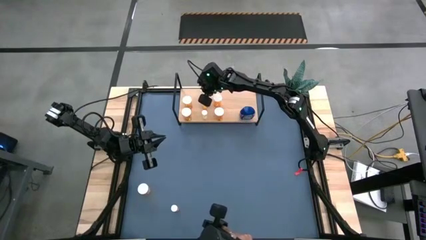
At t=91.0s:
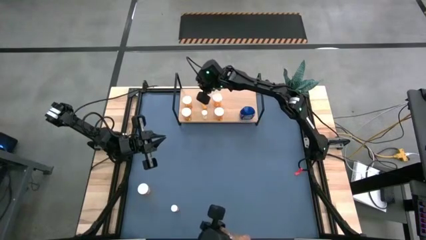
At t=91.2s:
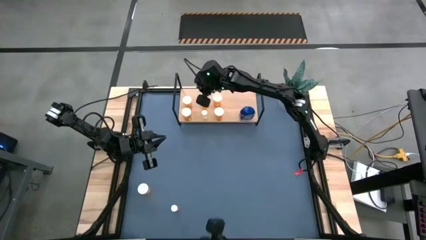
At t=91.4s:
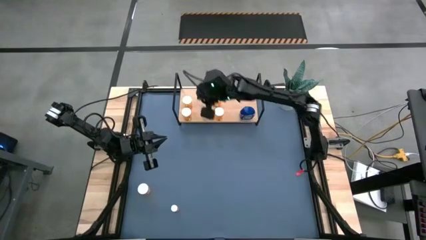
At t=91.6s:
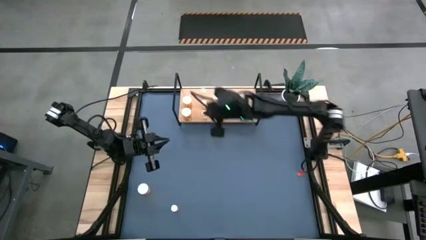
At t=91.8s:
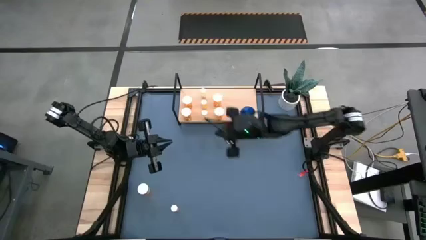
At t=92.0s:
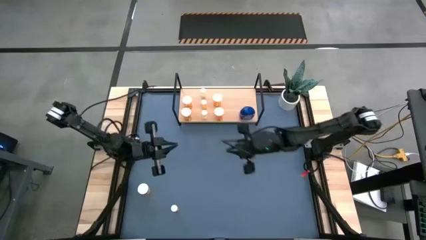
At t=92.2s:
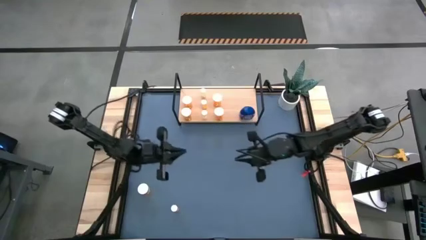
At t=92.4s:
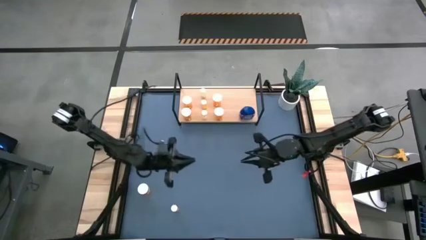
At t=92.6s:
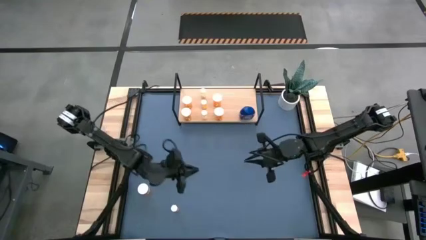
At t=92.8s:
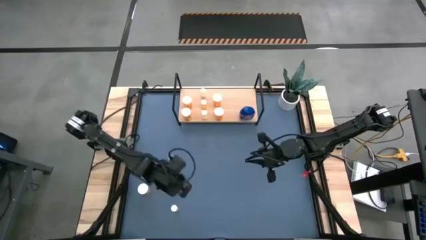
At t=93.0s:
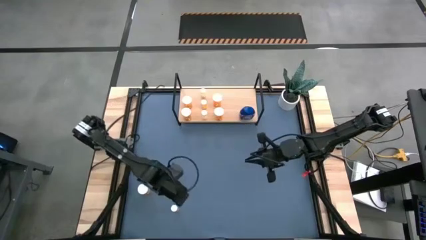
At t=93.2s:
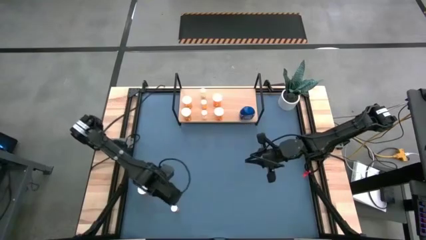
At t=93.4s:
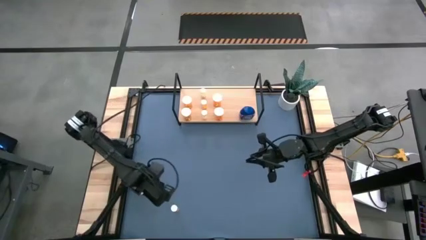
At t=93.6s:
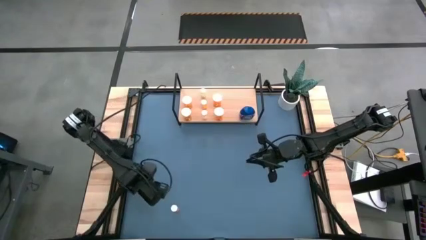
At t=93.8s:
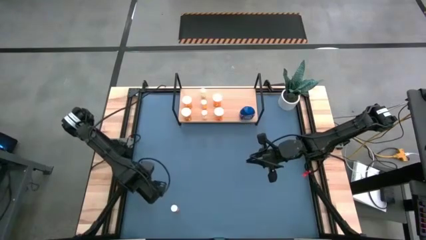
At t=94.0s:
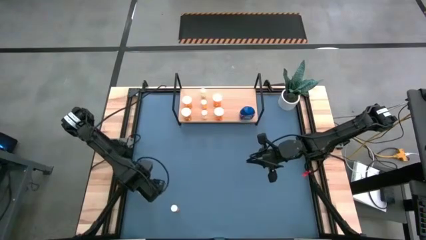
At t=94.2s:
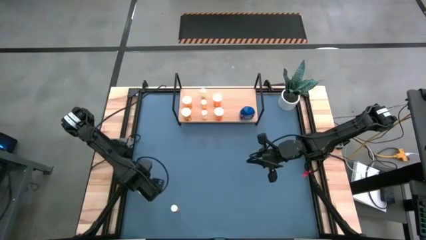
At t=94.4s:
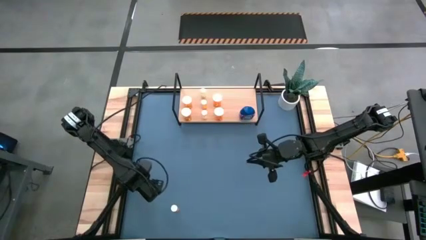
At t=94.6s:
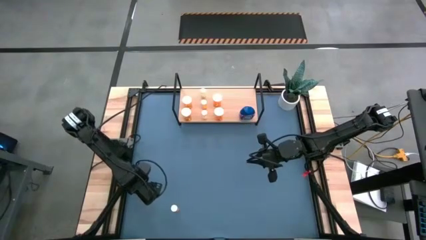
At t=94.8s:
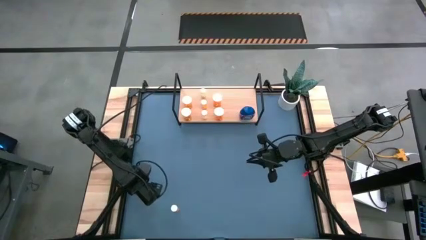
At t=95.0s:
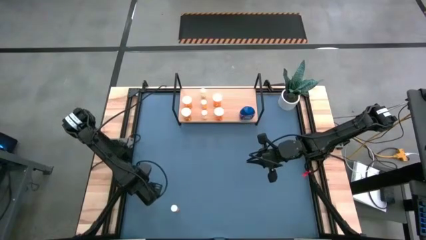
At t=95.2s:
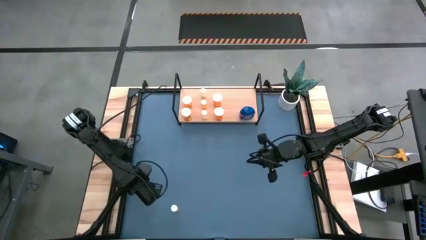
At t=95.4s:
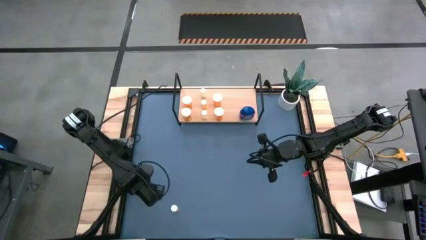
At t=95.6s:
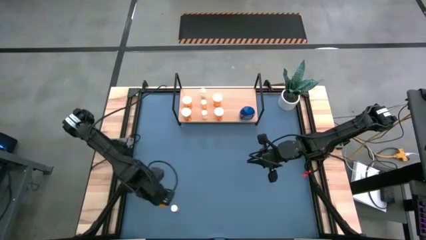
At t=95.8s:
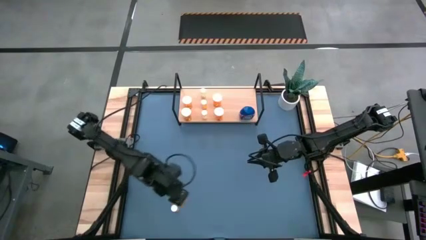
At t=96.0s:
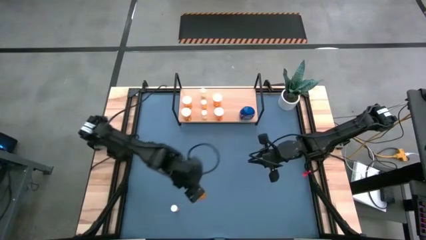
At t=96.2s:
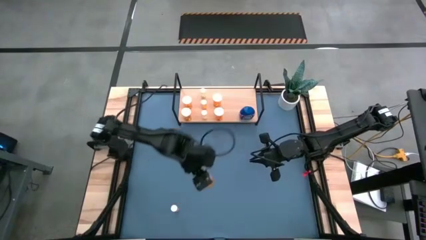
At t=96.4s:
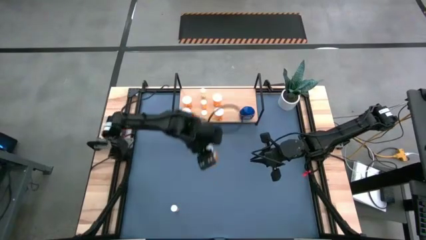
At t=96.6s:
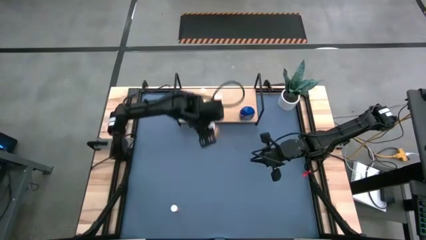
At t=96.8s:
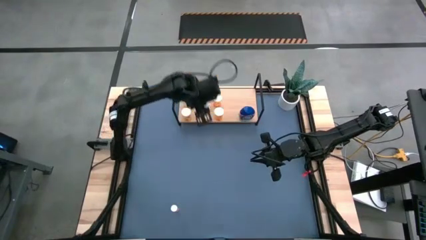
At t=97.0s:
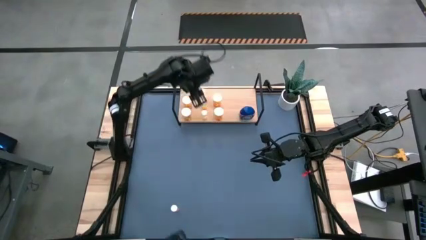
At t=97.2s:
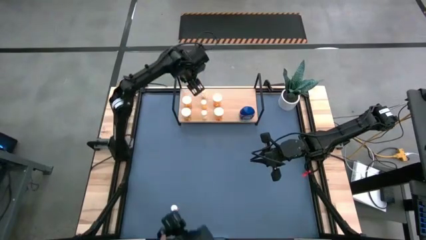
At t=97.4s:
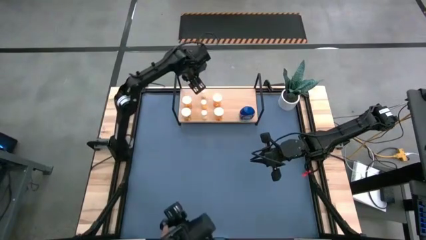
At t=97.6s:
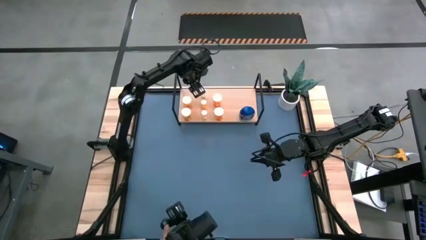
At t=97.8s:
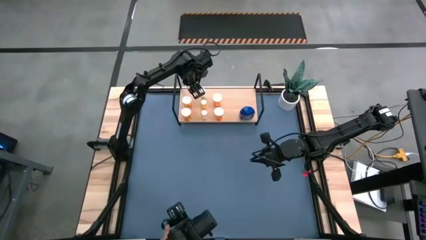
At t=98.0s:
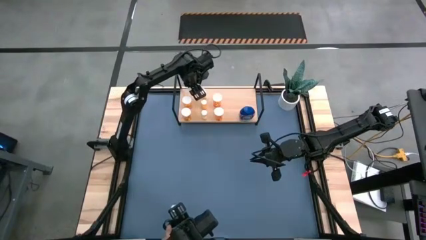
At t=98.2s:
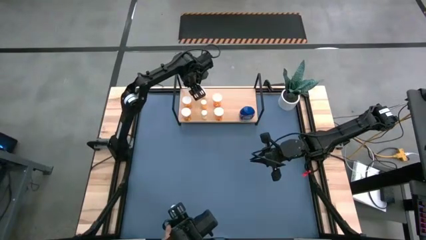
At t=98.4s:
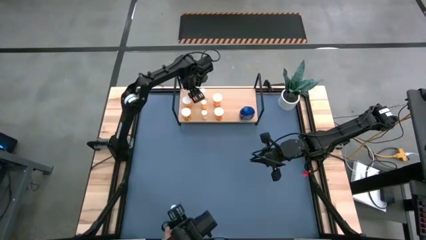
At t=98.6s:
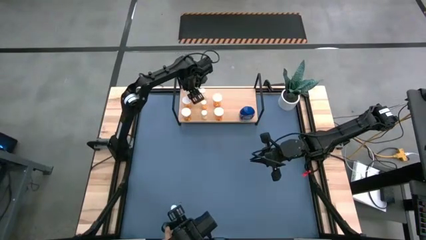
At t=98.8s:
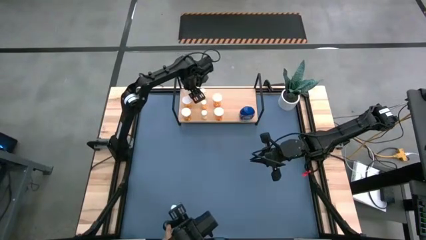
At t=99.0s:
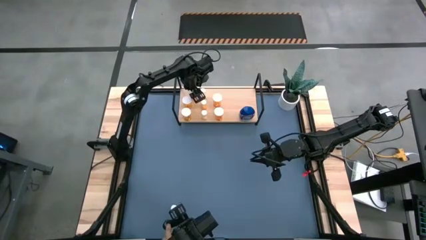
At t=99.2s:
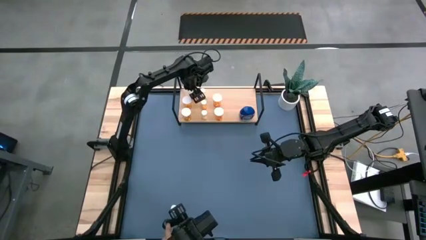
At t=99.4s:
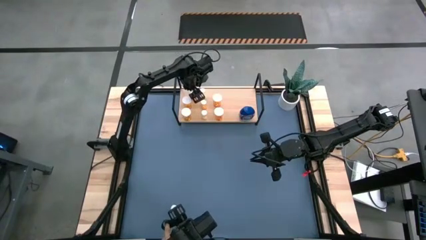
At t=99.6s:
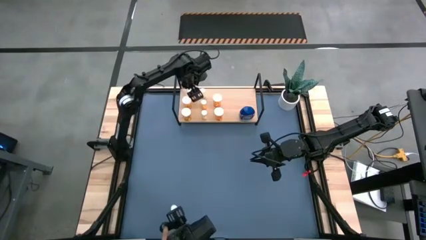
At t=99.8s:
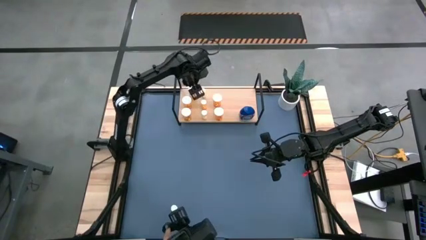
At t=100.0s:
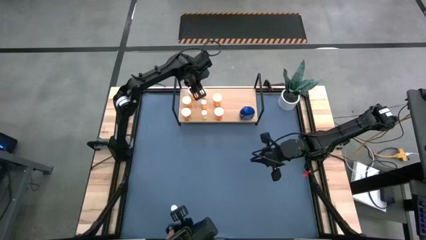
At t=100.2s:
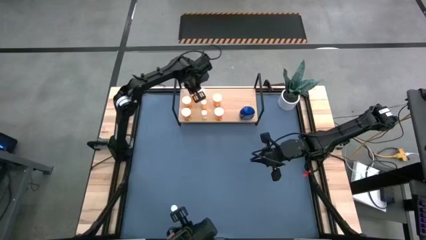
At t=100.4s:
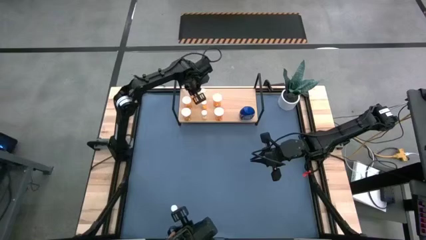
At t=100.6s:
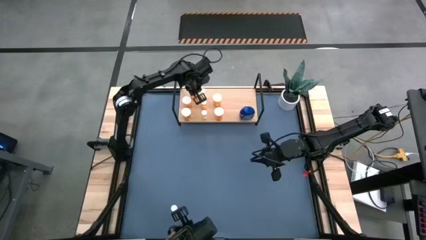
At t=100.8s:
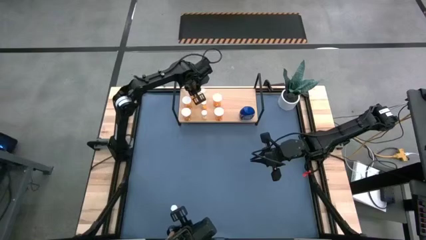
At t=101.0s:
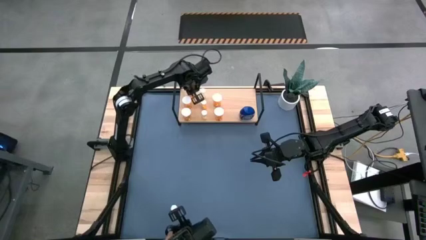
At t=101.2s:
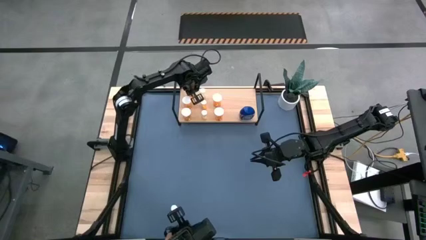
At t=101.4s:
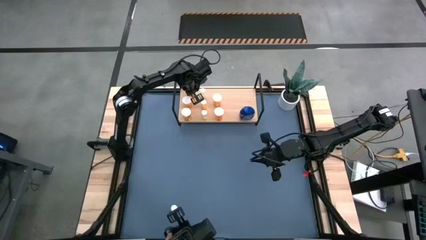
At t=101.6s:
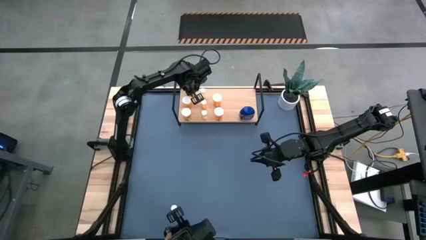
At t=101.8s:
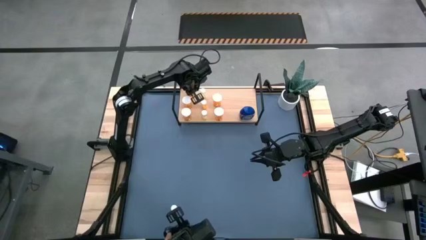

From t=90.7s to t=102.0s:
Task: Pick and place medicine bottles onto shelf by color
Put the orange pill bottle on the shelf
